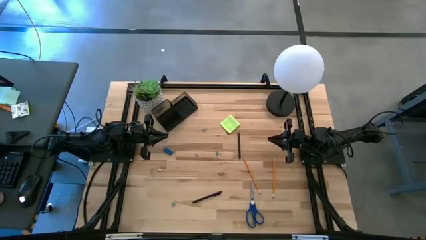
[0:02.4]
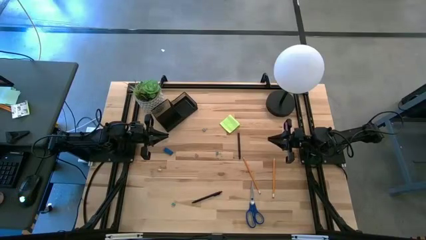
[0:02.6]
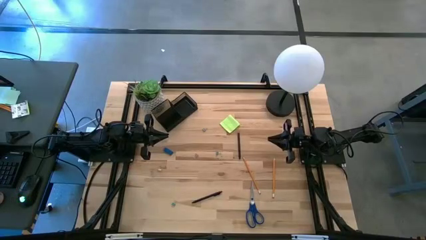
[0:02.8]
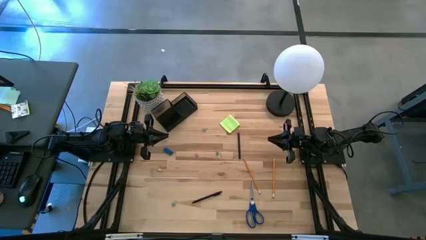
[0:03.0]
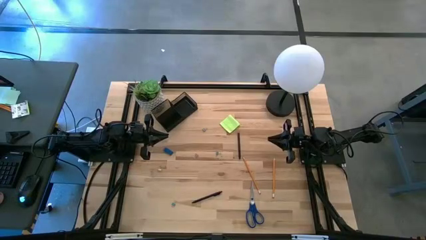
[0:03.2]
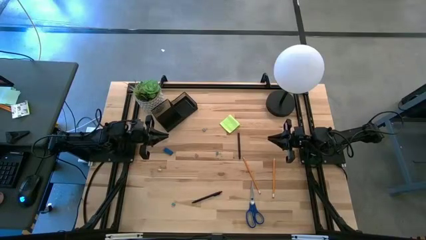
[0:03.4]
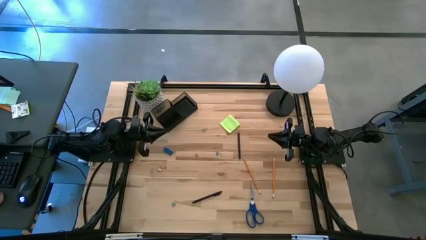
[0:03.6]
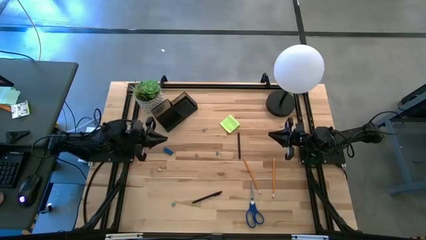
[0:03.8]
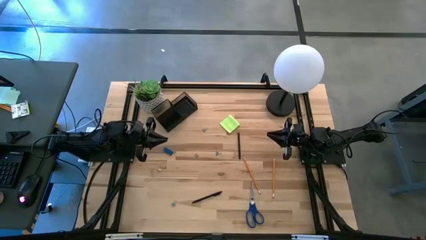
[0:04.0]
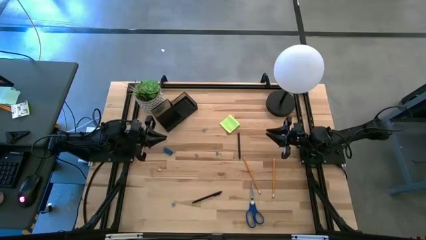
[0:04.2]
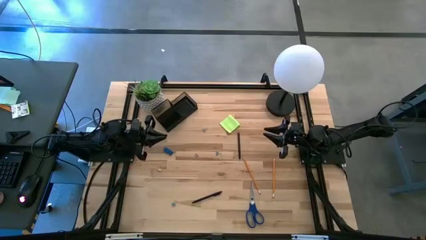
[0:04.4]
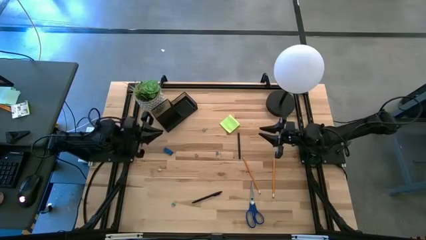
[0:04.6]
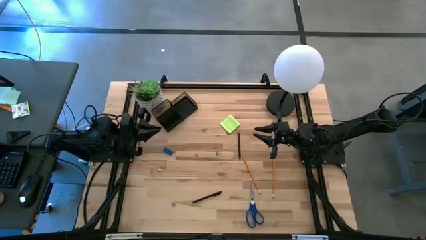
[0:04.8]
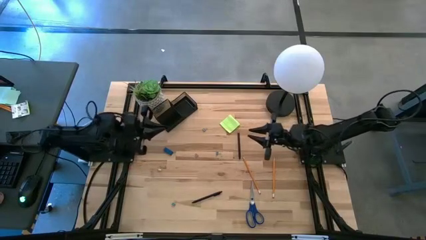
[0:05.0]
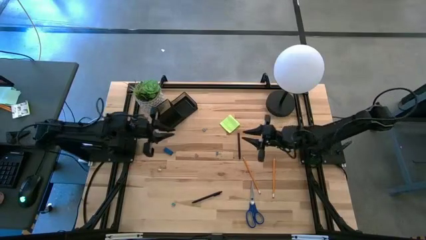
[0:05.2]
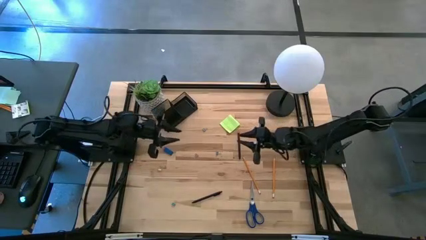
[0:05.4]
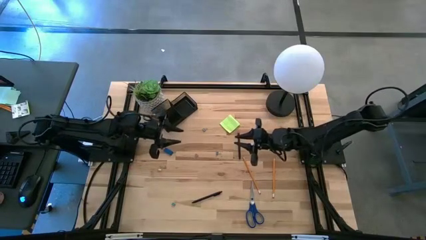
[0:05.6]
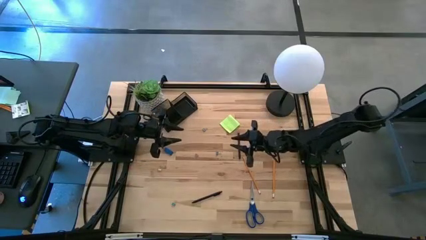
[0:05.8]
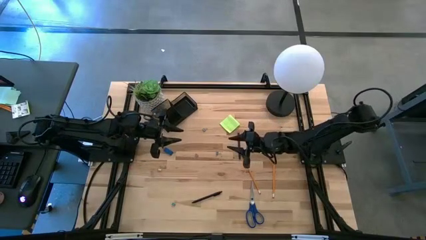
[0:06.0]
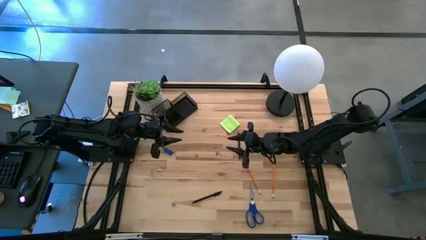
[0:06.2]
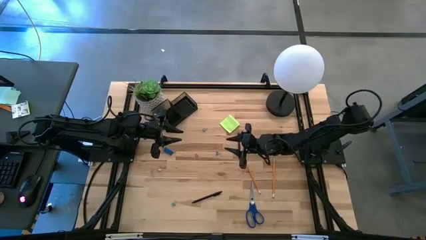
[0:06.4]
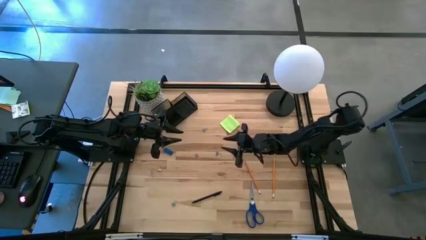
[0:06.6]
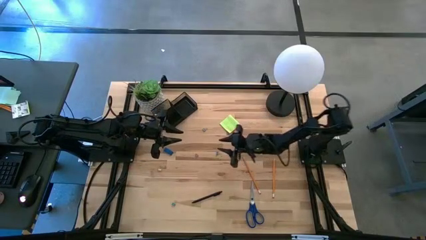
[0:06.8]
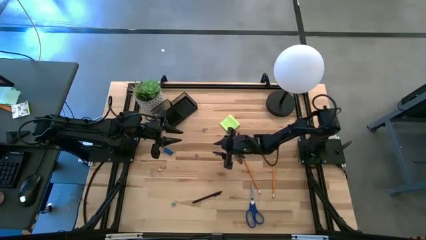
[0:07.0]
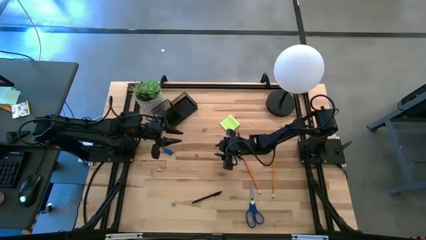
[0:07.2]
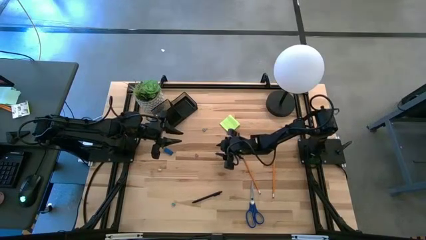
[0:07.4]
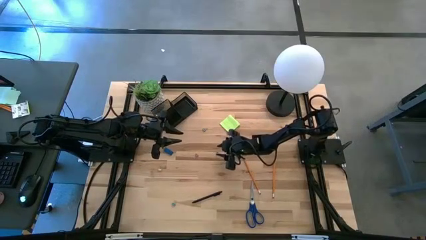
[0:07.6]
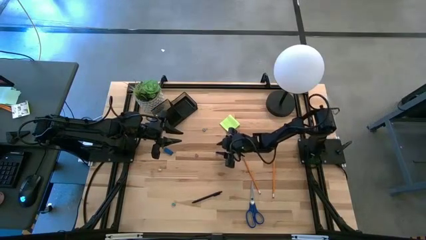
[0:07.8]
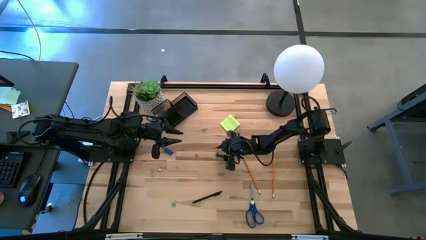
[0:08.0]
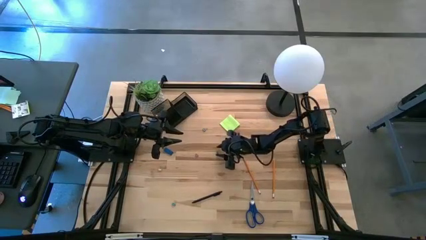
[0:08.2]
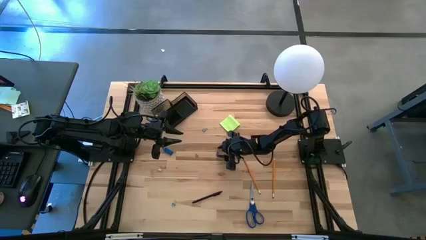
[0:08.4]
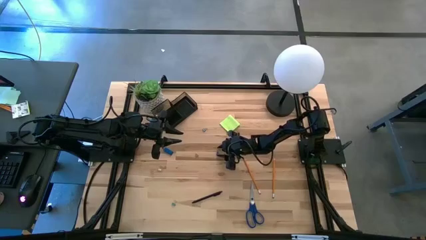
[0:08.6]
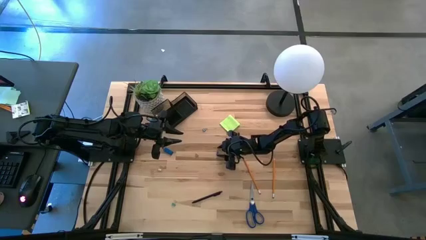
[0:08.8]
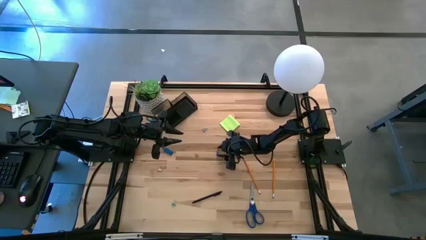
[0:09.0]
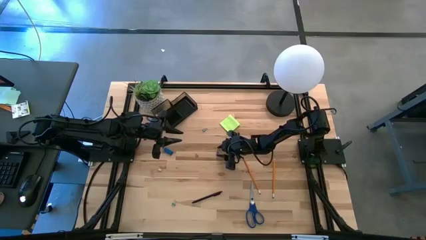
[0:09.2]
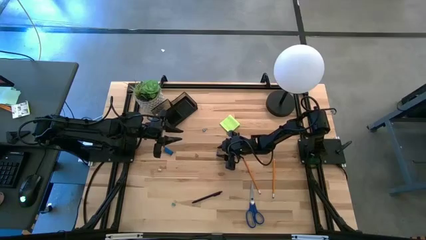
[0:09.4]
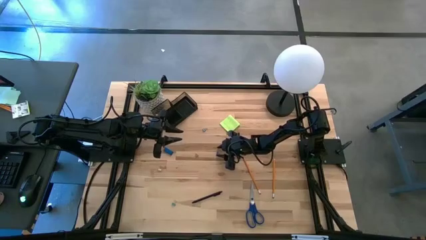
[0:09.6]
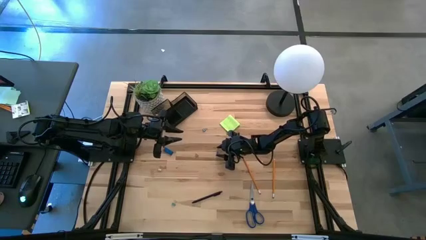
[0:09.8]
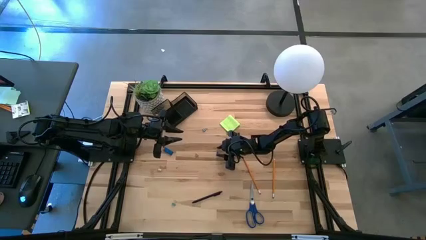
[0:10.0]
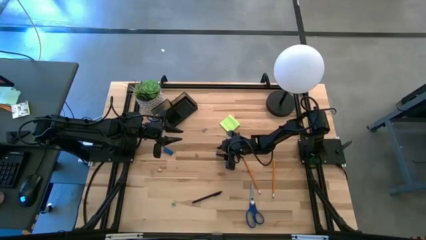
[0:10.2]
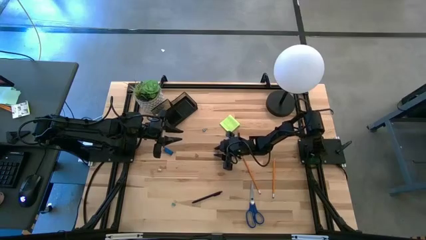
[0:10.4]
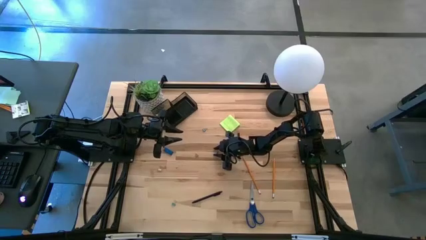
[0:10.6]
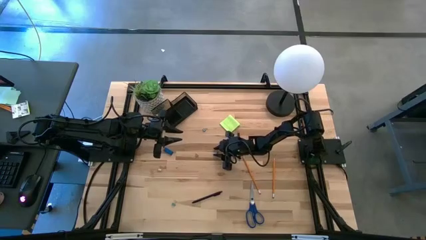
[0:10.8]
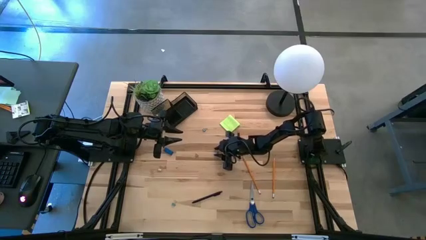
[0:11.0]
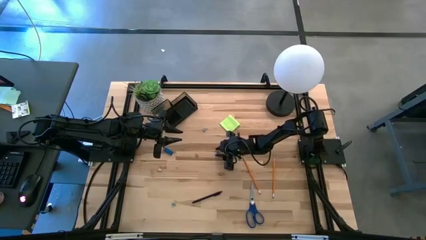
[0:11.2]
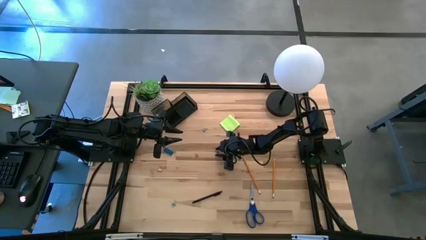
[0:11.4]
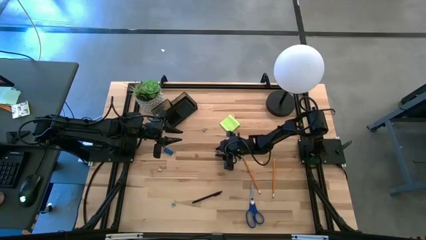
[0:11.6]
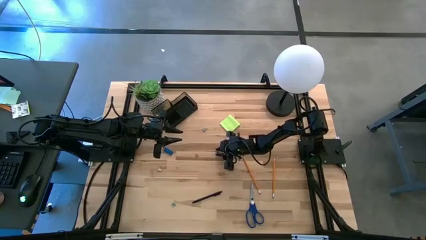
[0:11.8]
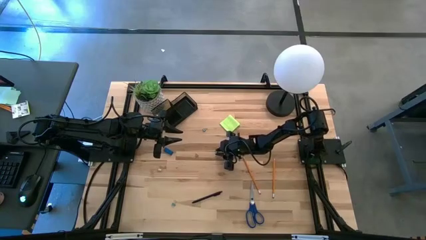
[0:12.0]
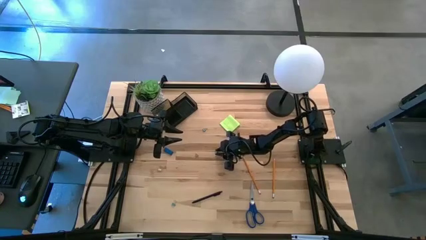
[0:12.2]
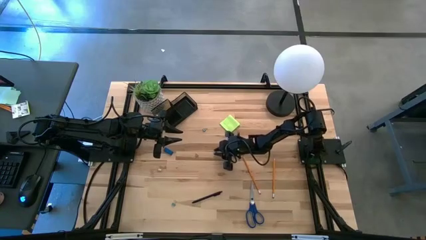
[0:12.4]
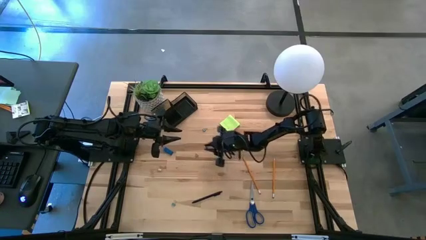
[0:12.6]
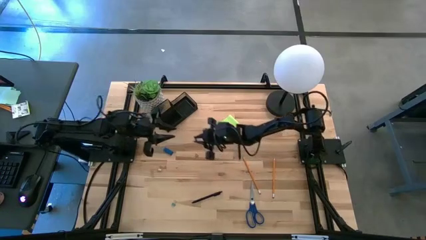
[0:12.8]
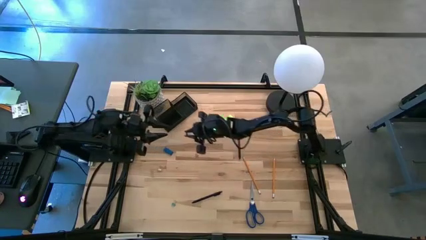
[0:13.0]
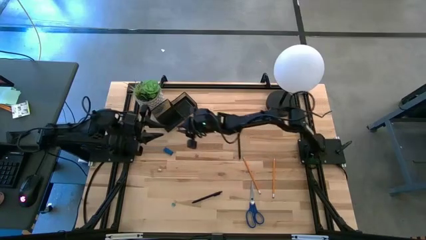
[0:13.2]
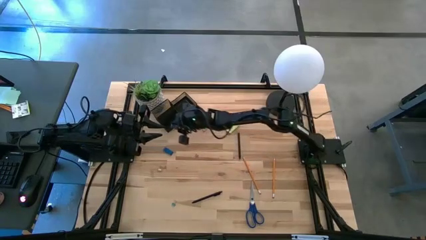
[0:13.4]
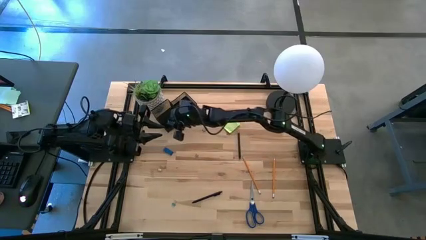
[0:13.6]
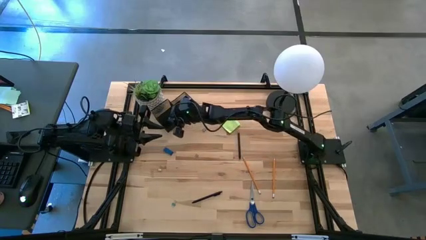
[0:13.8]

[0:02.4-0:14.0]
Task: Pick and place office supplies into organizer
Put the center blue binder clip into the desk organizer

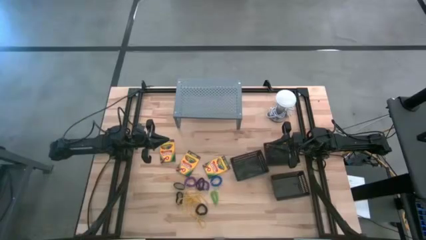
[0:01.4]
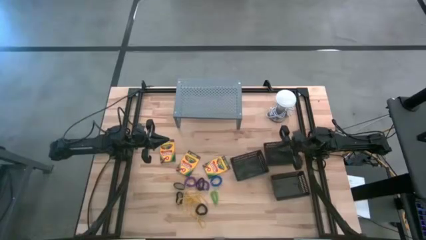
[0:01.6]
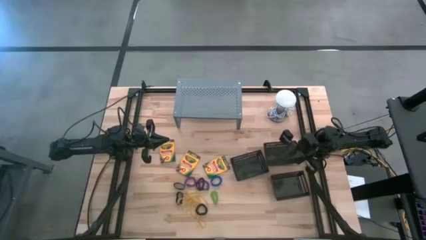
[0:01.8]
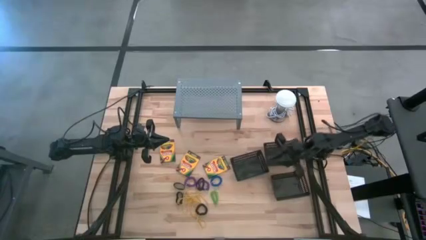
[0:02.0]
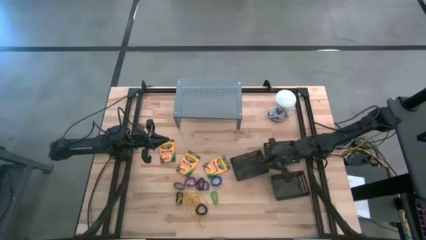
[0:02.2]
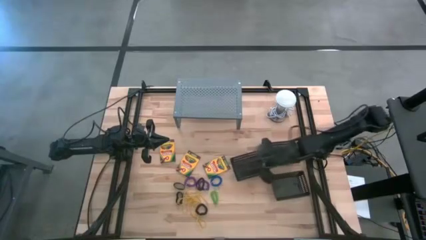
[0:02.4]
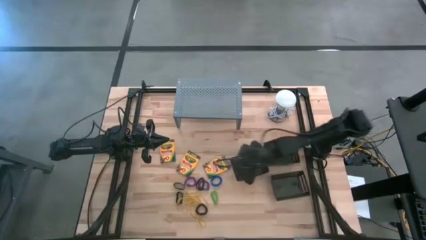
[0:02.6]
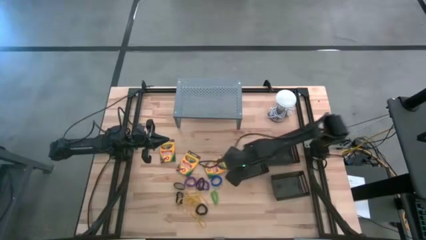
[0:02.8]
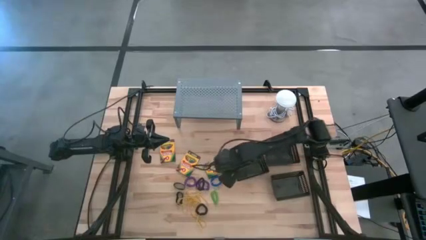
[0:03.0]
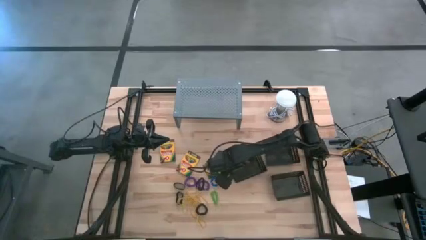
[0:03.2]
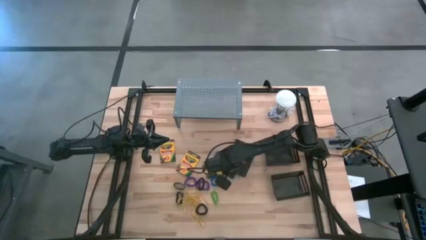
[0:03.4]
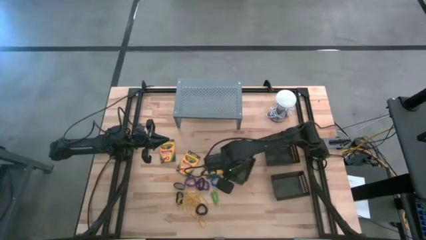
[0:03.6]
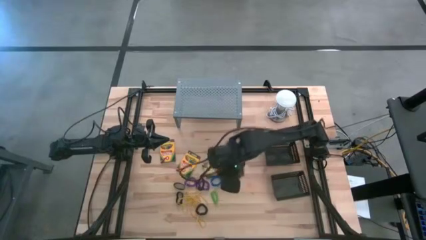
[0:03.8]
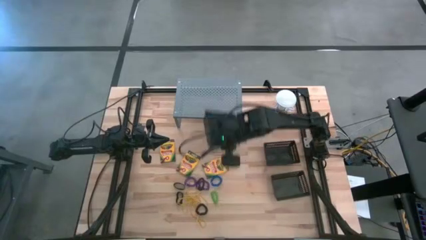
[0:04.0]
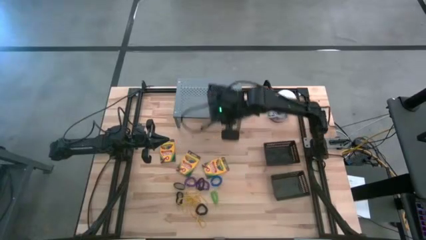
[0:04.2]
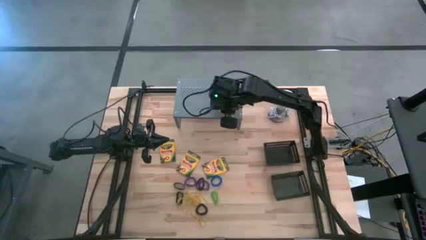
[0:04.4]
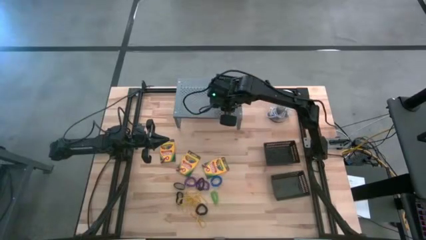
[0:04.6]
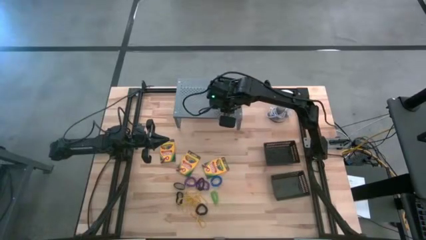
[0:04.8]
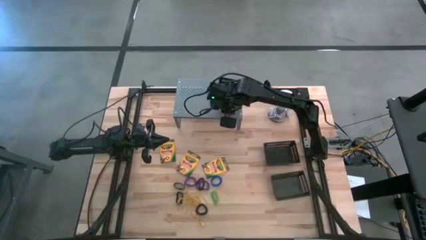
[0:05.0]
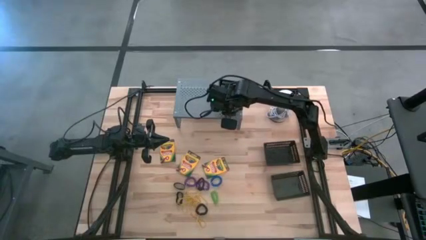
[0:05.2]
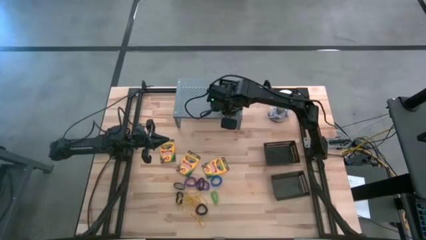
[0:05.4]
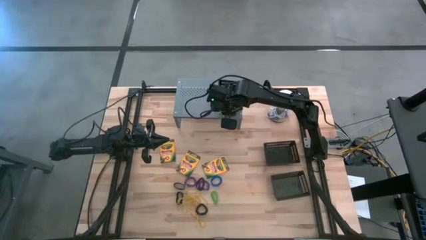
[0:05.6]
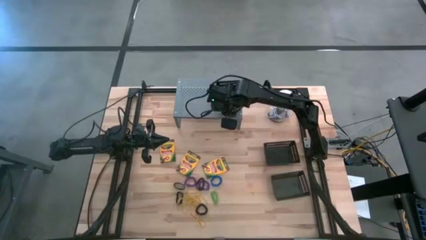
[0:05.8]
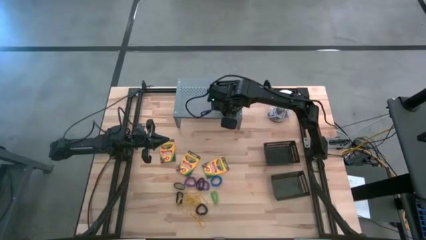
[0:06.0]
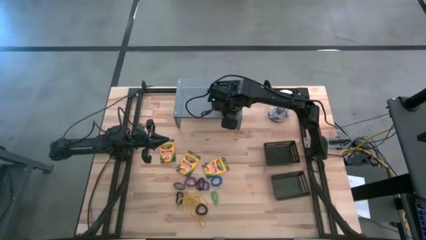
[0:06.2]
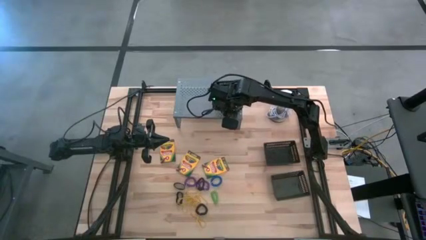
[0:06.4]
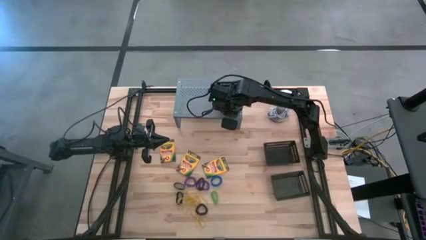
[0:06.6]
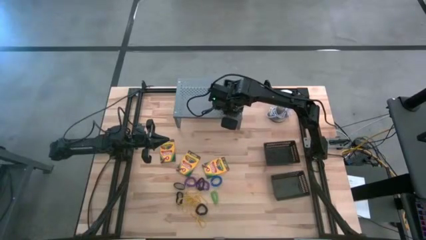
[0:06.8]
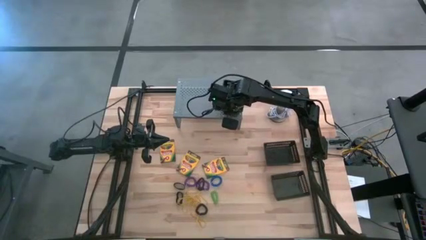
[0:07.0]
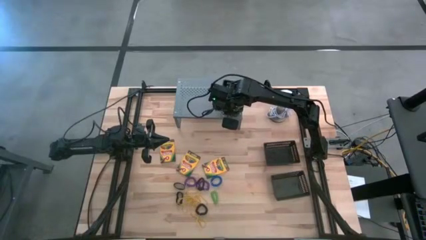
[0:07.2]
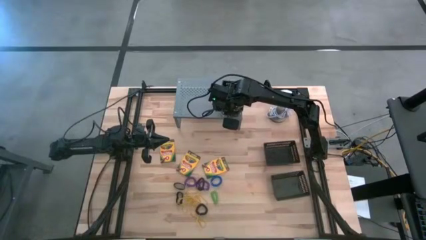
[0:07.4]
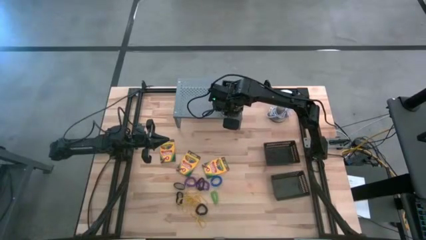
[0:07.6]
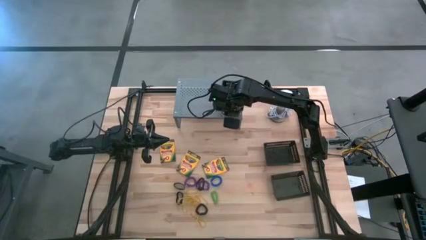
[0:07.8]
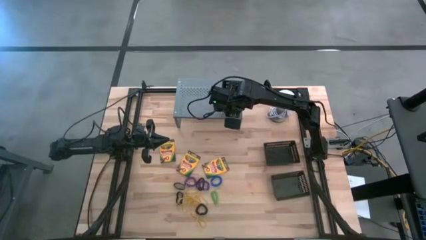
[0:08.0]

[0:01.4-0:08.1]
Task: Pick & Place Office Desk Supplies
Put the top left black bin on the shelf
